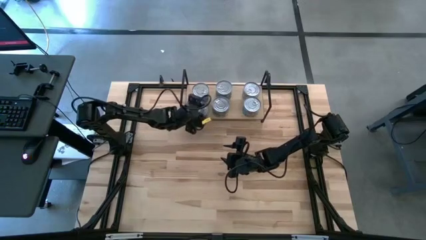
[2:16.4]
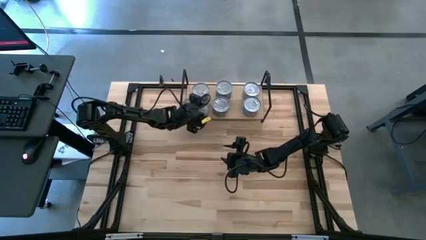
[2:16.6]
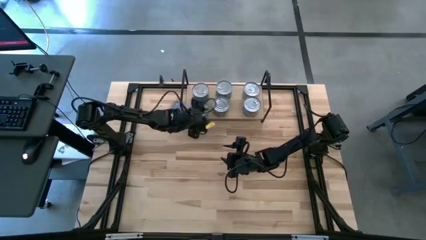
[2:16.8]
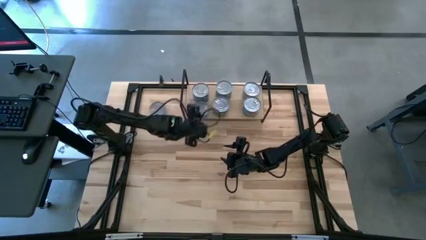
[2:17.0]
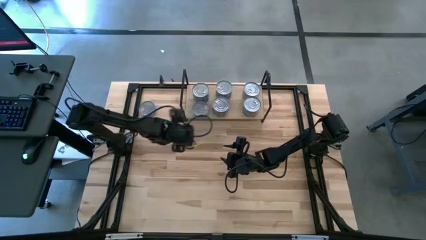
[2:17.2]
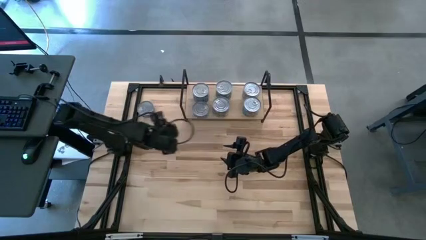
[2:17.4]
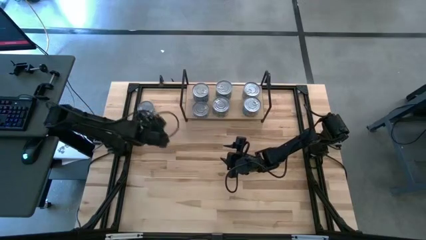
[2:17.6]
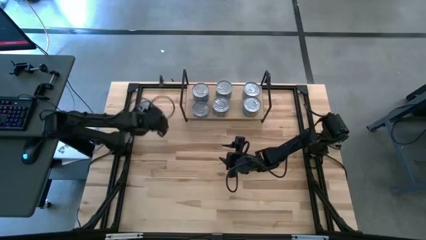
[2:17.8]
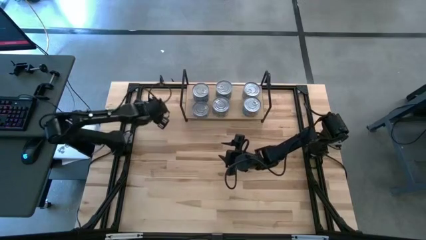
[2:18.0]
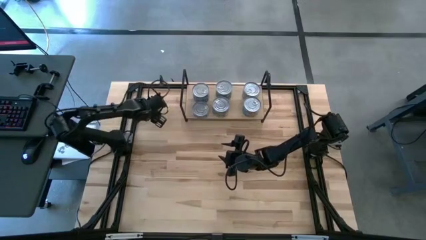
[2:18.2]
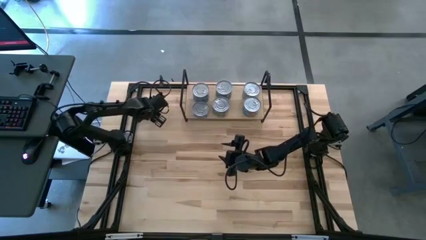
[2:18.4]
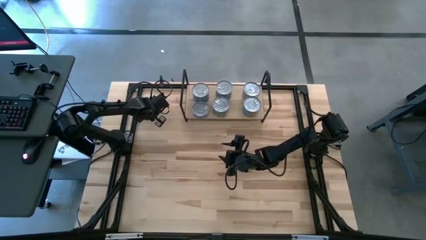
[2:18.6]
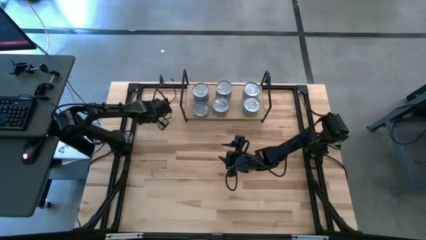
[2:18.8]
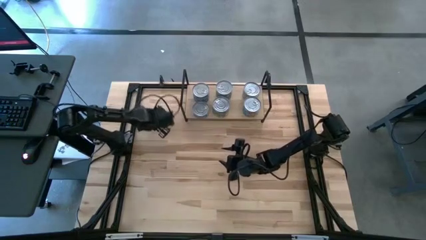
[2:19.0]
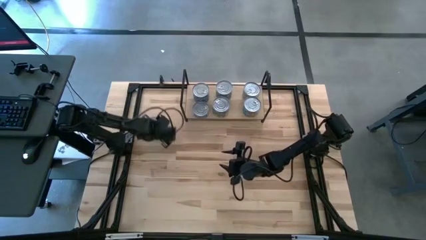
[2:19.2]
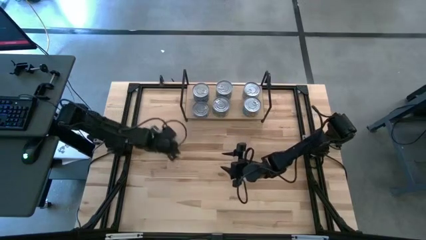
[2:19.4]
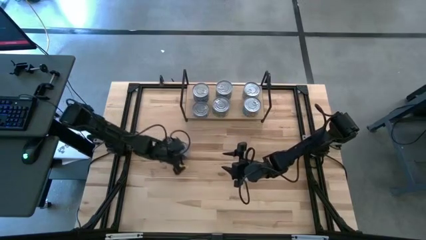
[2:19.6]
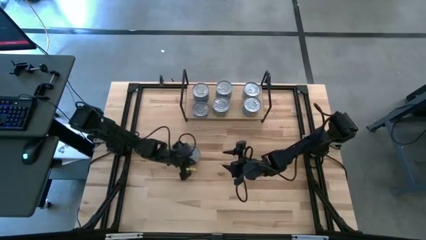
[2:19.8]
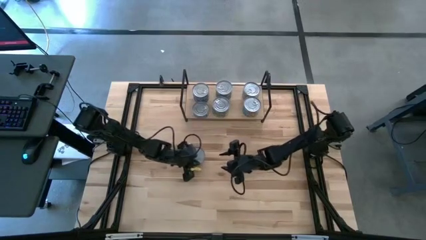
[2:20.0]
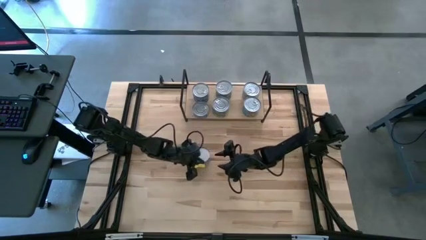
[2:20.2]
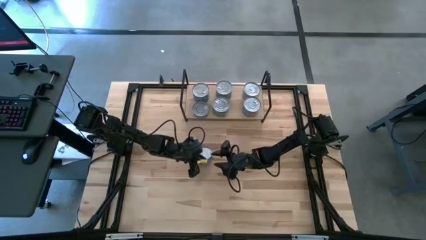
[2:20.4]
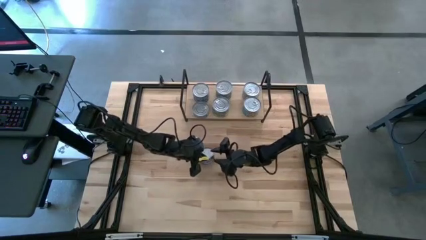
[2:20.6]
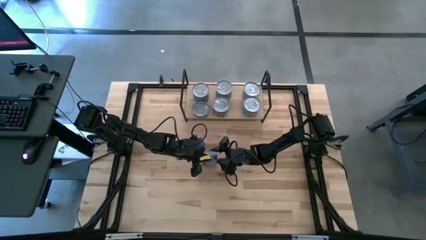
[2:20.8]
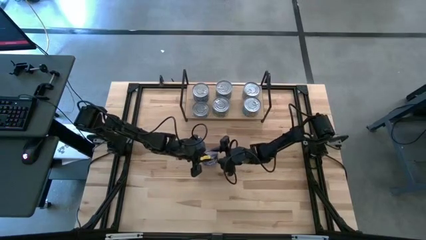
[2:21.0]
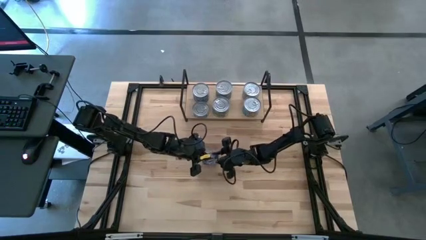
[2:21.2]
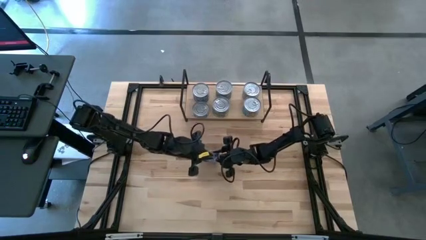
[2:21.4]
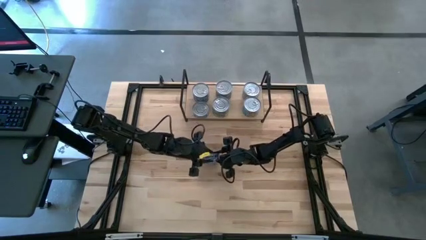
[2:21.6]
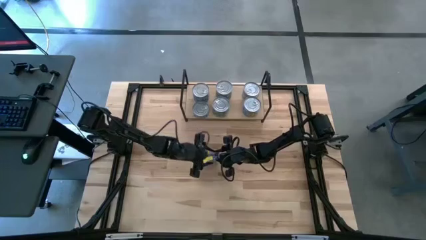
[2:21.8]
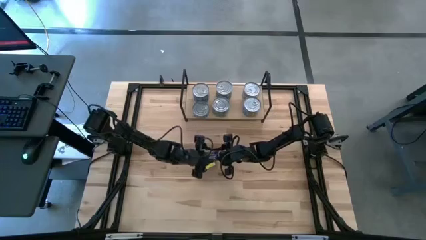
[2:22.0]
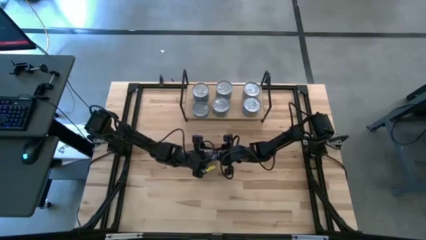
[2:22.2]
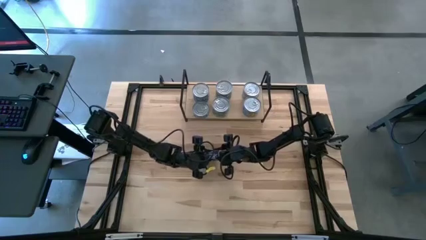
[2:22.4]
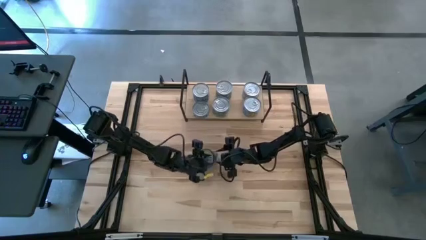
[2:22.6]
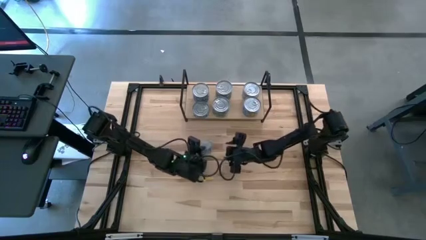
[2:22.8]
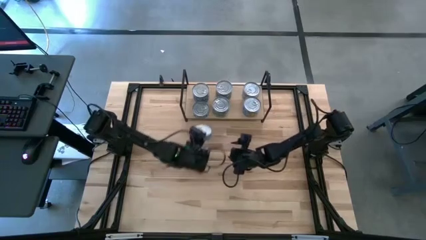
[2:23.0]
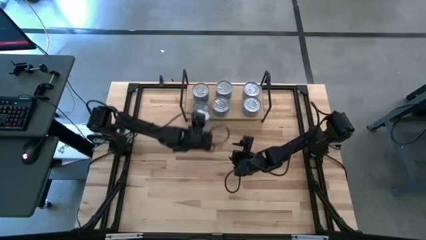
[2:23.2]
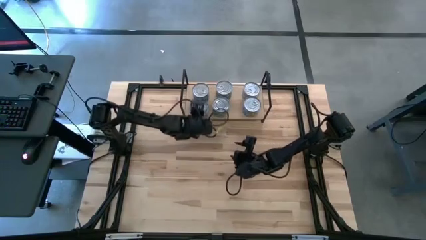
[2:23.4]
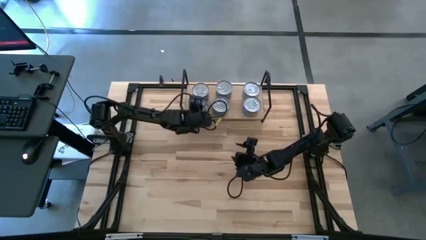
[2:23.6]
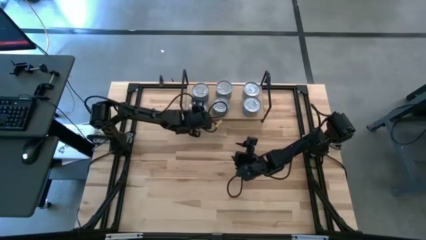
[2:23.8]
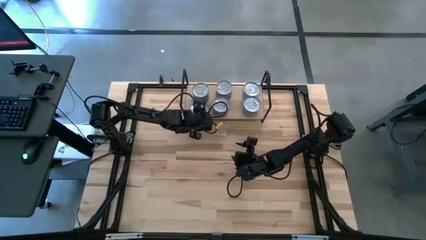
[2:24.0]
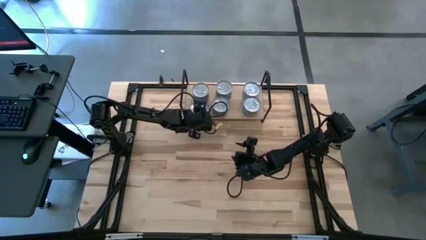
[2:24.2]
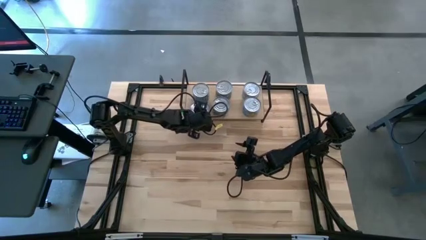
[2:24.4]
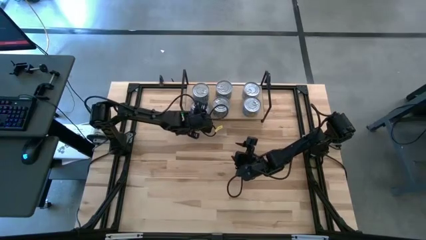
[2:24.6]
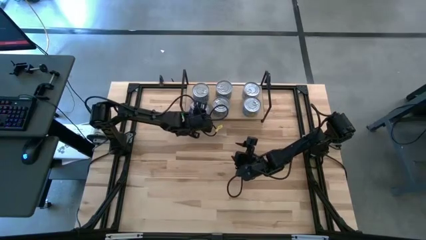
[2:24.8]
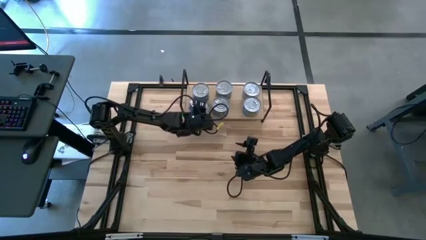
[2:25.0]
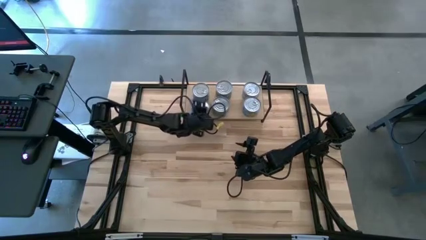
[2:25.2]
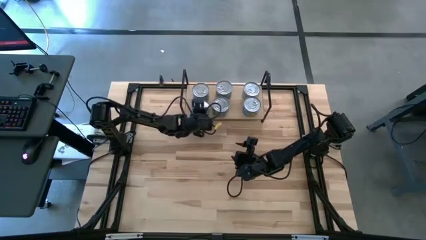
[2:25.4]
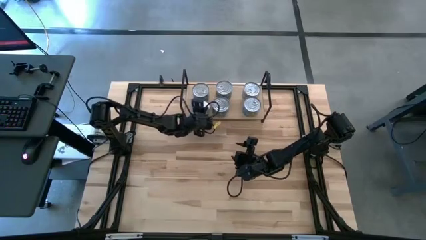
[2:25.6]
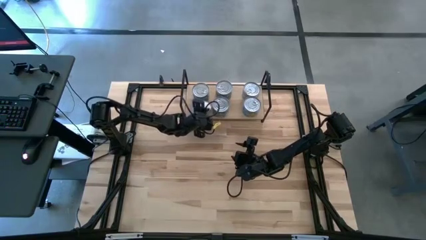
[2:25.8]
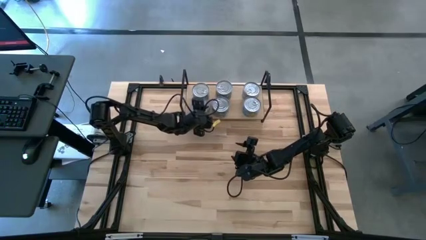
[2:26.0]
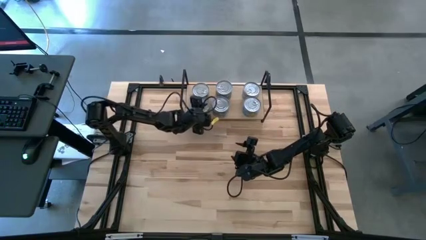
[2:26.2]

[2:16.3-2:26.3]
Task: Stack canned seafood by type on shelf
Stack the blue tuna can on top of the bottom blue tuna can on the shelf

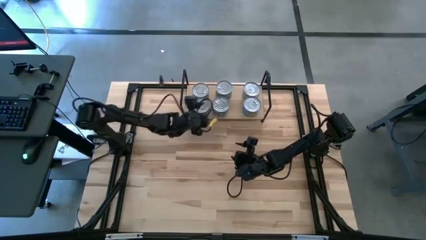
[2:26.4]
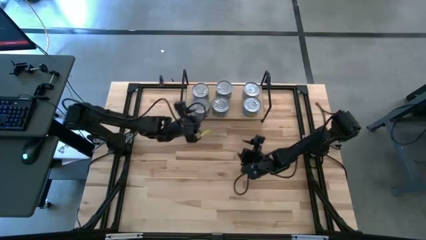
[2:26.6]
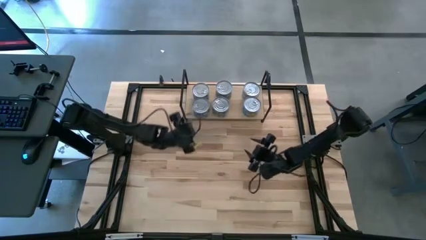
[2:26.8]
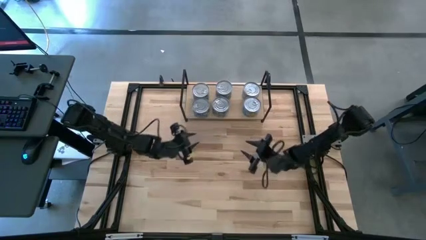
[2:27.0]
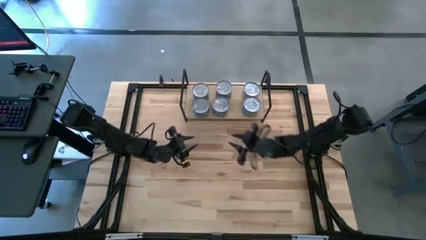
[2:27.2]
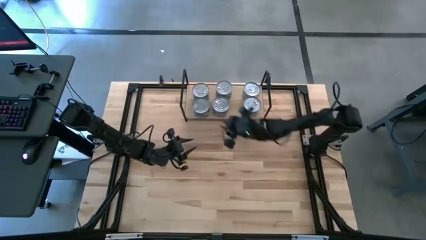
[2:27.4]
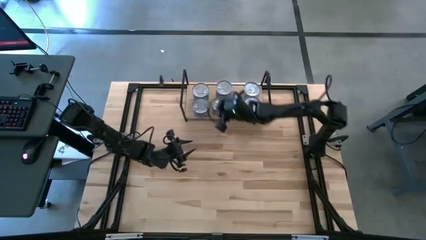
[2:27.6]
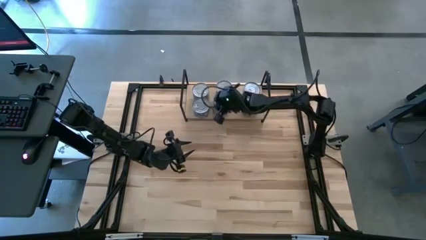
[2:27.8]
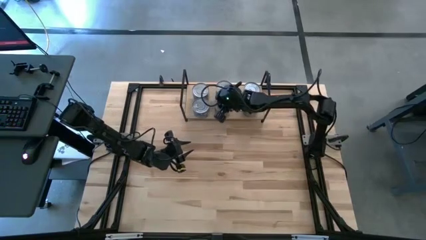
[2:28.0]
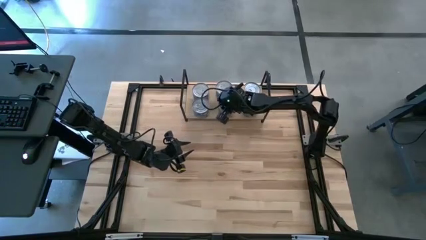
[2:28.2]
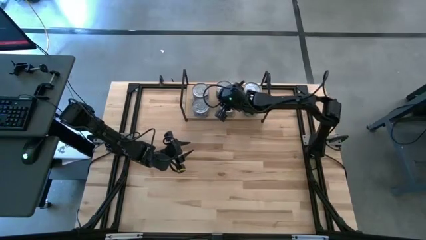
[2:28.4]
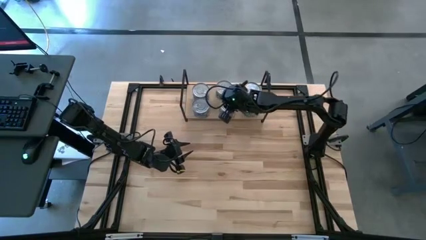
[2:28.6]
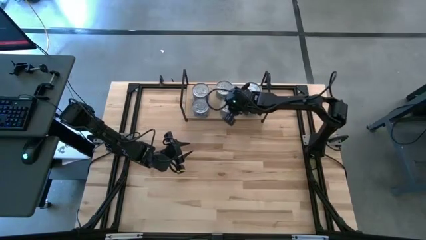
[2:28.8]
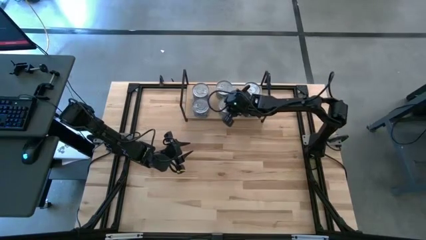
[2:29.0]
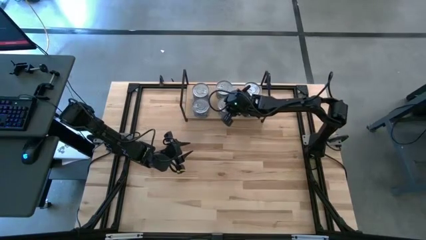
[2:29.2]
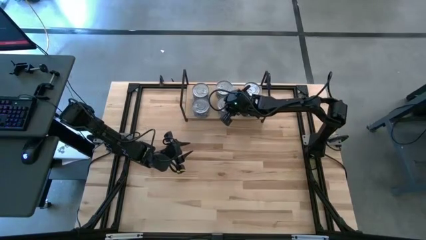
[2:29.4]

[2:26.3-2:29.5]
Adjust the green tuna can on the shelf

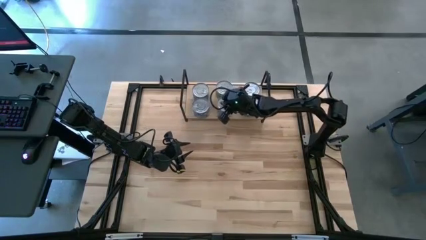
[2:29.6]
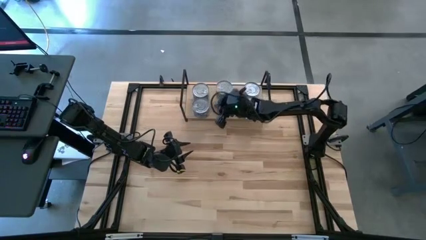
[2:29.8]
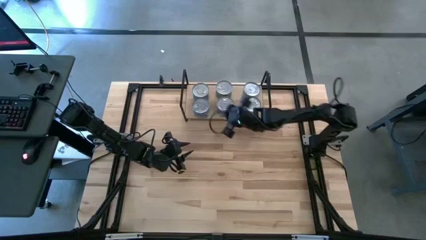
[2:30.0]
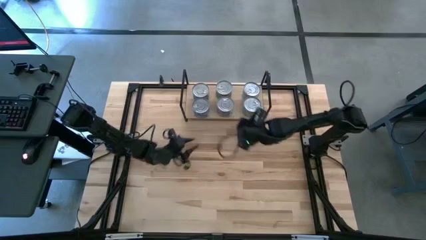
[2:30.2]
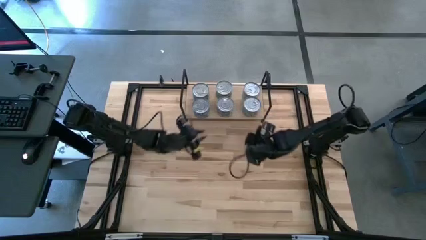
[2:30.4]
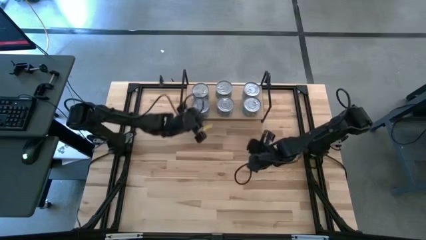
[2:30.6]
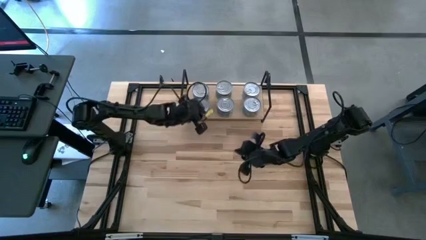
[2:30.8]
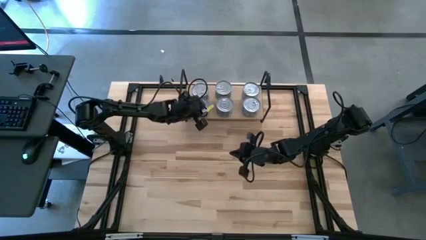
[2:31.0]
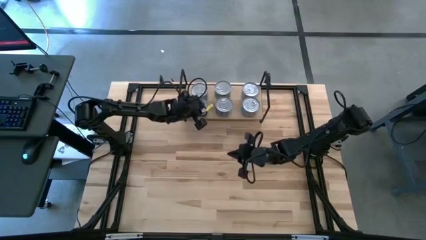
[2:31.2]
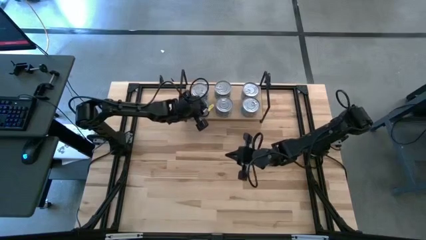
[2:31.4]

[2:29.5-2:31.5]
Adjust the shelf
